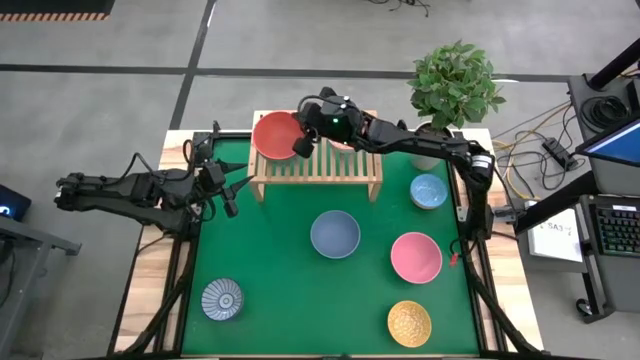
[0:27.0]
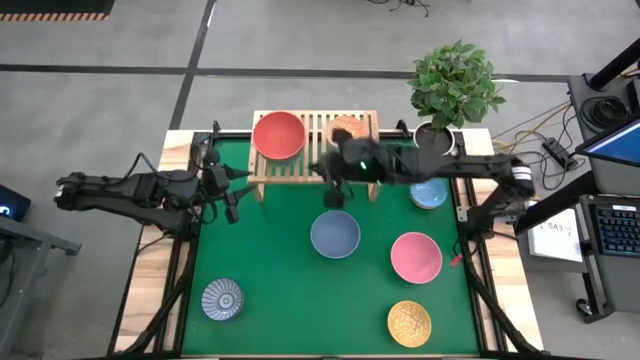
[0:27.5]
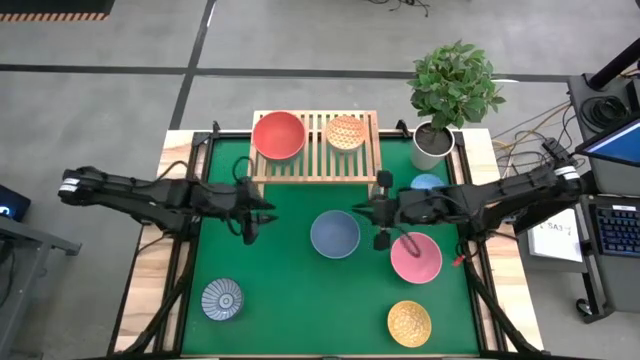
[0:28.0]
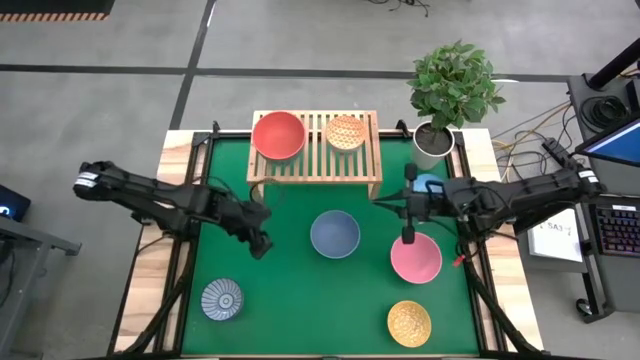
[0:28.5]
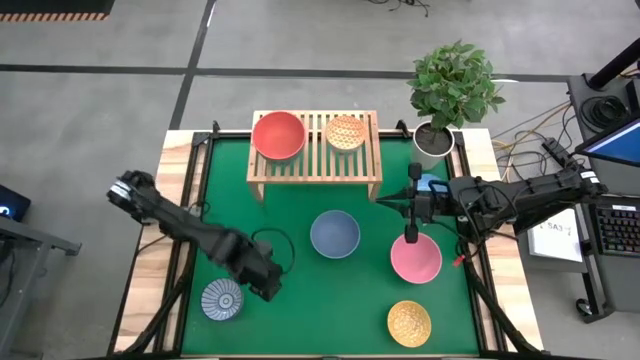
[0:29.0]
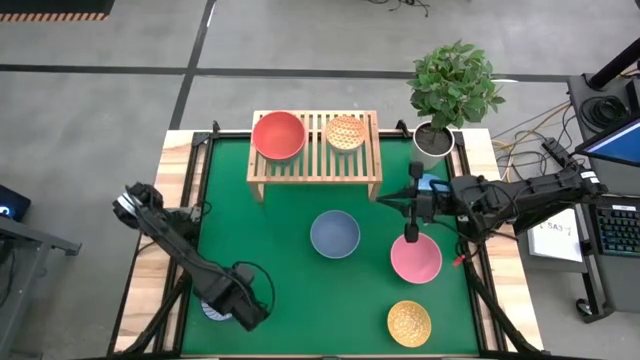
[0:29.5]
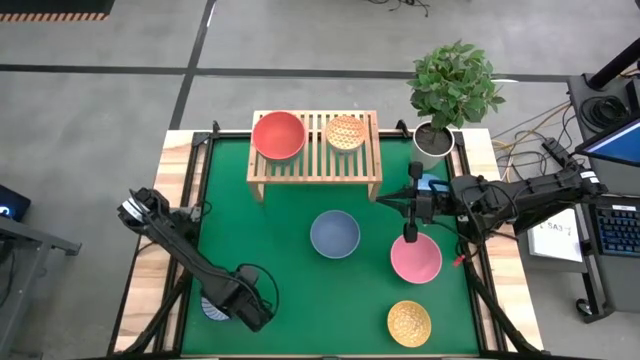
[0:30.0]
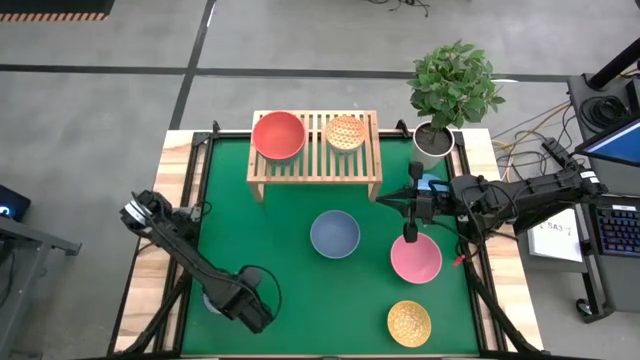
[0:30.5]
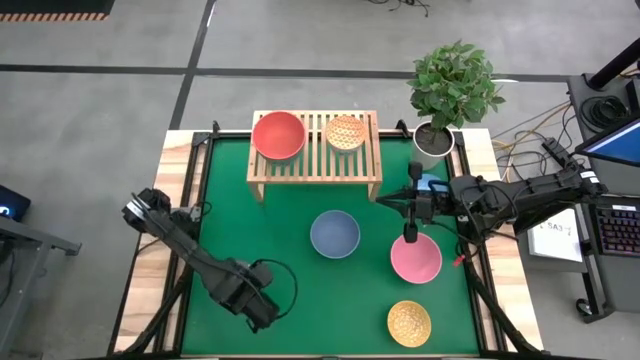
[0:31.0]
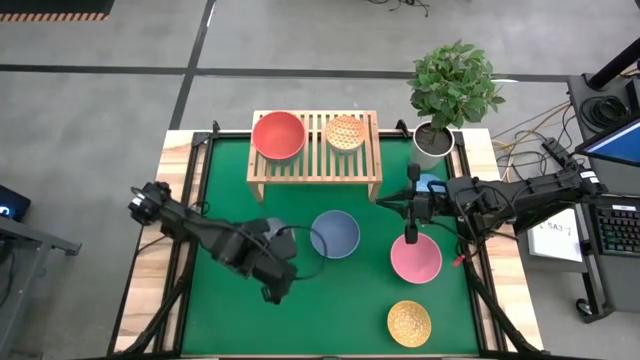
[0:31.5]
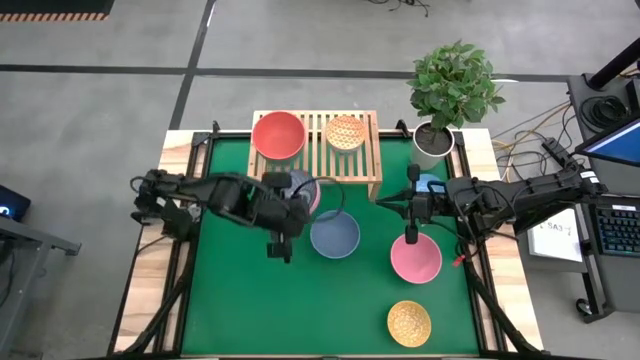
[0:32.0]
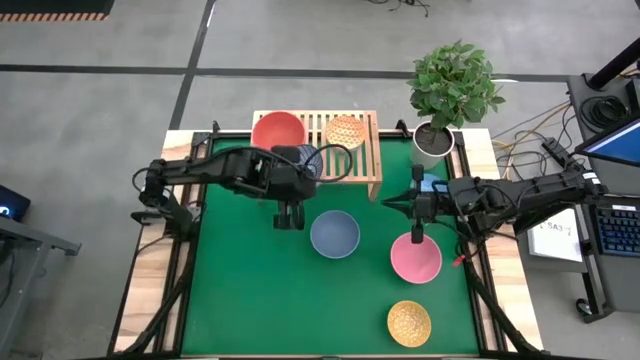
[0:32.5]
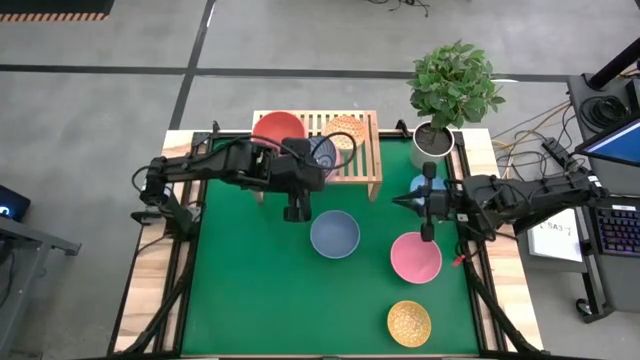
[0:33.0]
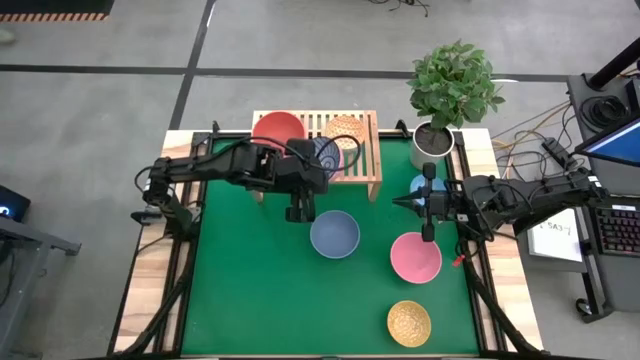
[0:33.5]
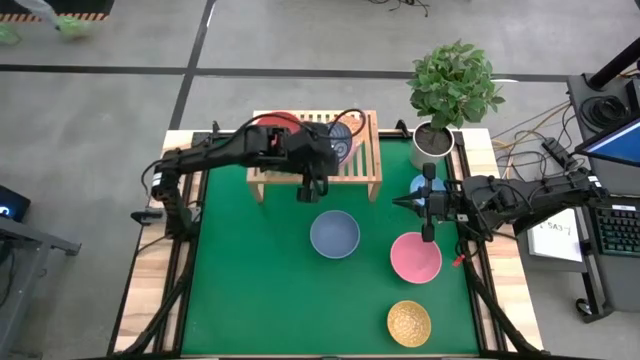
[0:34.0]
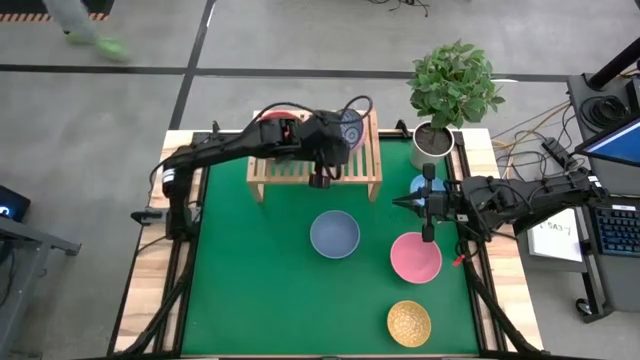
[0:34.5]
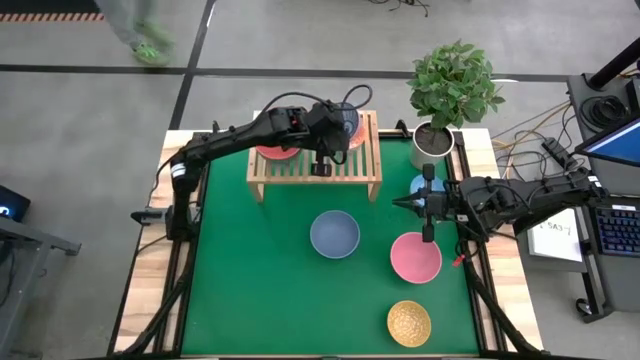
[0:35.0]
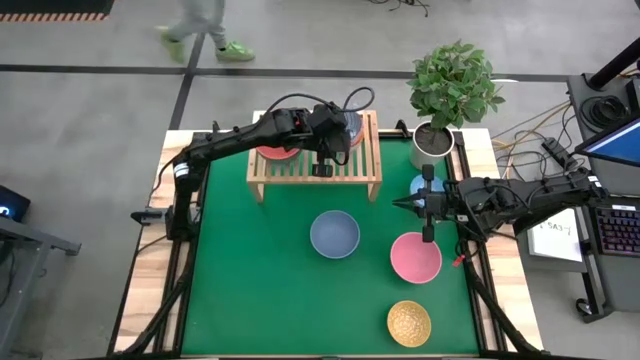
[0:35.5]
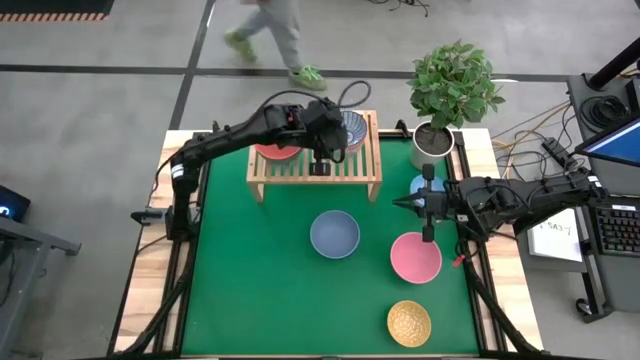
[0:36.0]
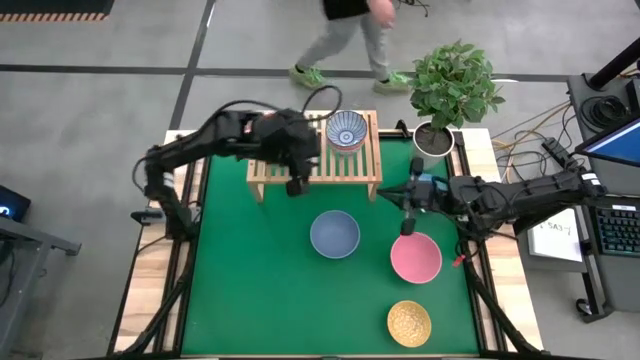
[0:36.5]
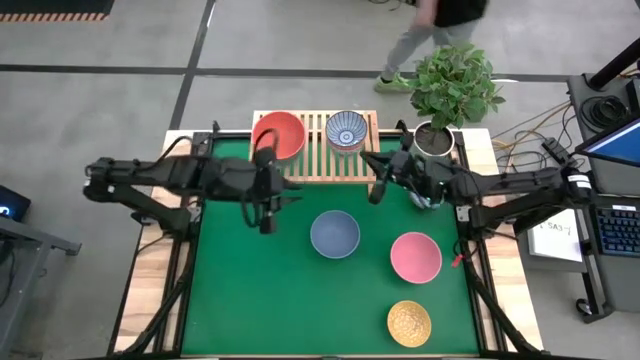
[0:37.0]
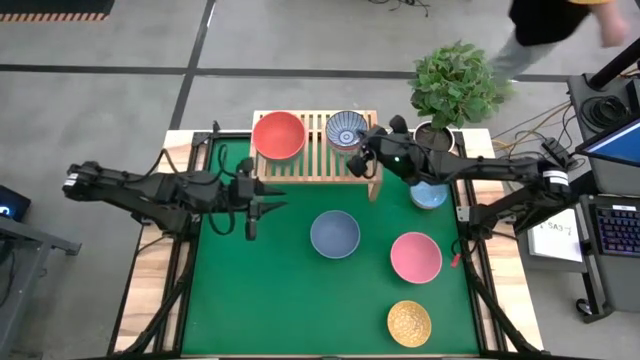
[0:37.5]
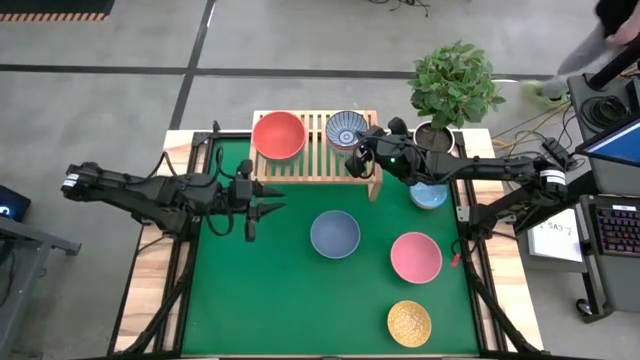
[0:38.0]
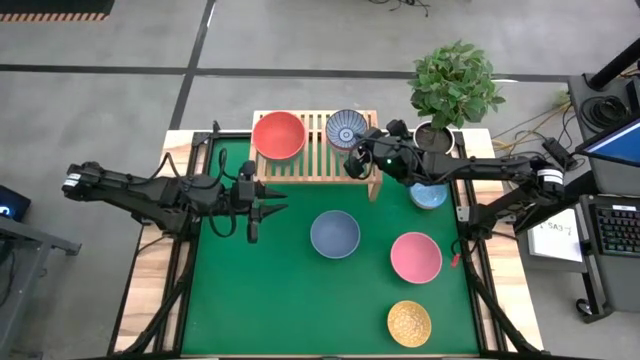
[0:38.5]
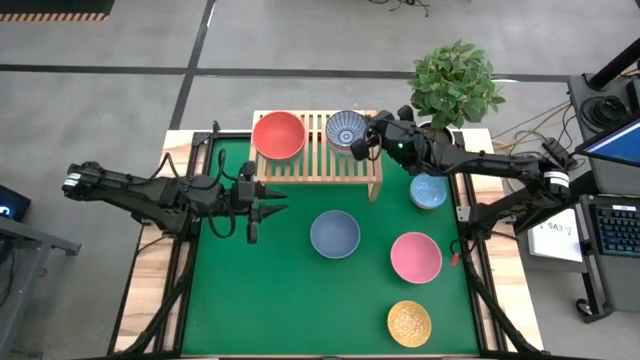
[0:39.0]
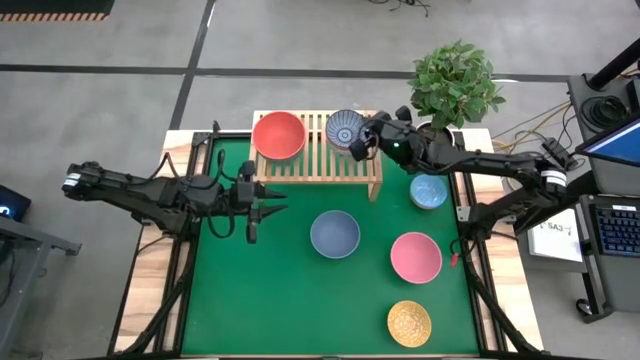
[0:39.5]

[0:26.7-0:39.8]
Task: Place and stack bowls onto a shelf
Stack the small blue patterned bowl on the small orange bowl on the shelf

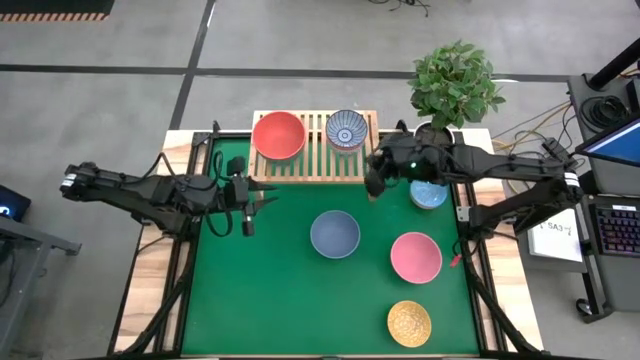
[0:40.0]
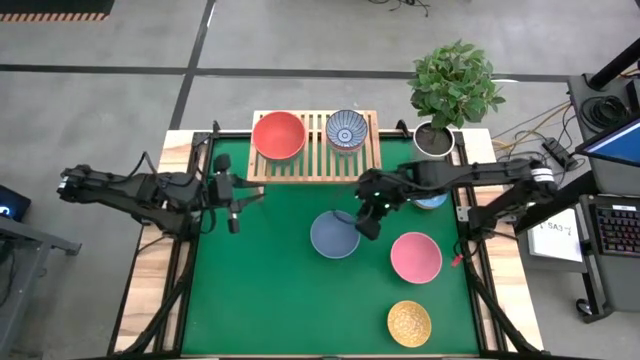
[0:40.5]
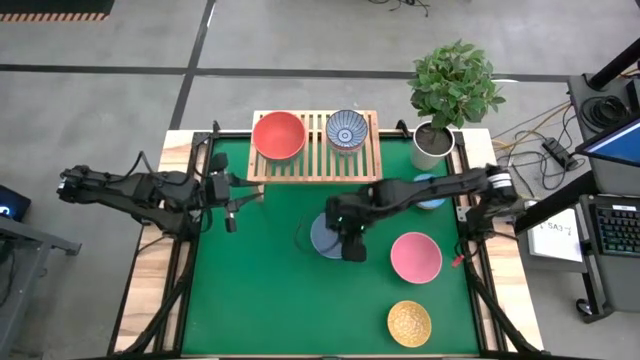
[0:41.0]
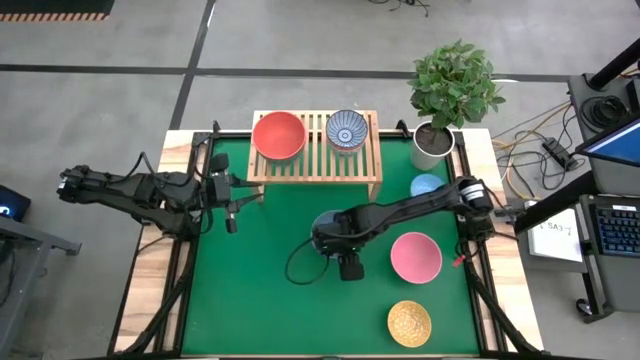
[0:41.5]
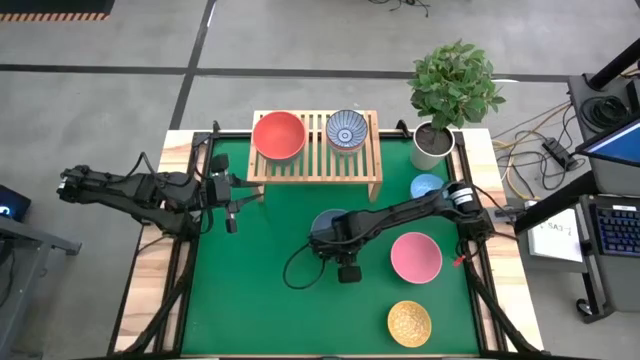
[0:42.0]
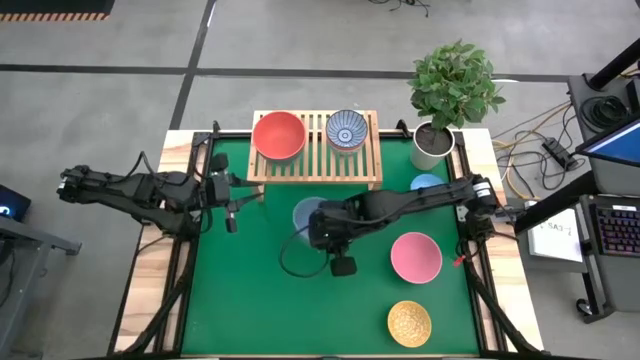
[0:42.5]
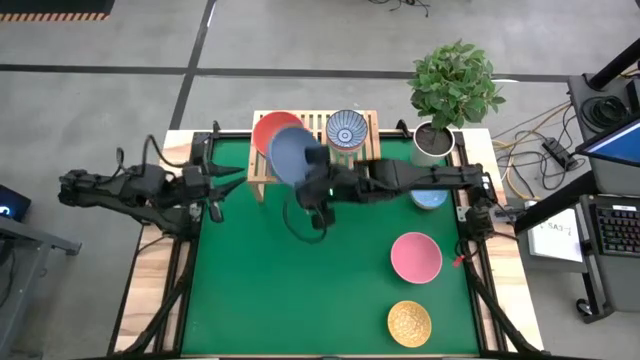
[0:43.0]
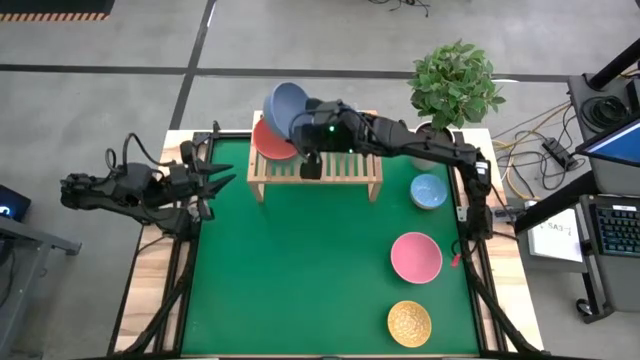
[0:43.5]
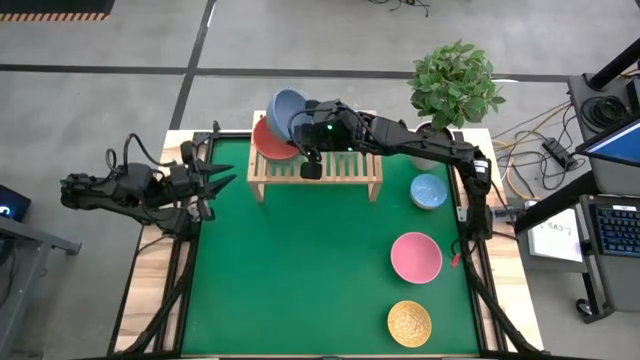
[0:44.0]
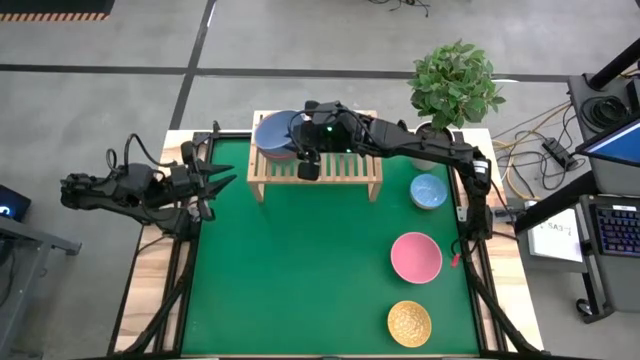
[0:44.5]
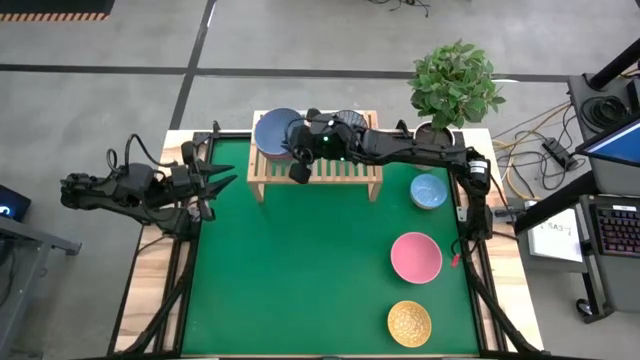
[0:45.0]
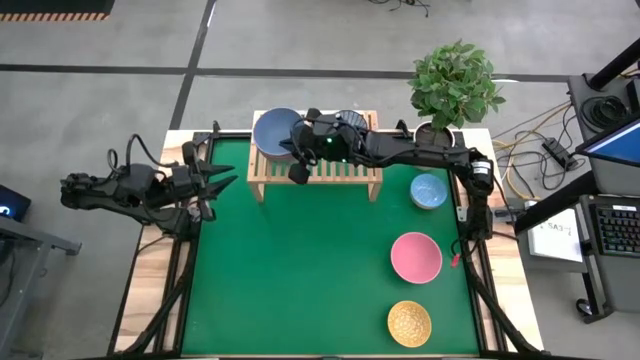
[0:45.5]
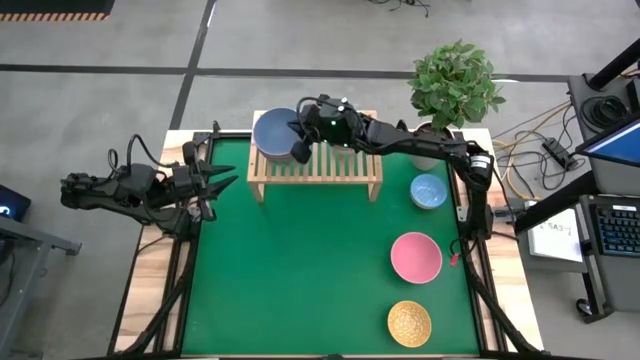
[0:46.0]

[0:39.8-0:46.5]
Stack the large gray bowl on the large orange bowl on the shelf

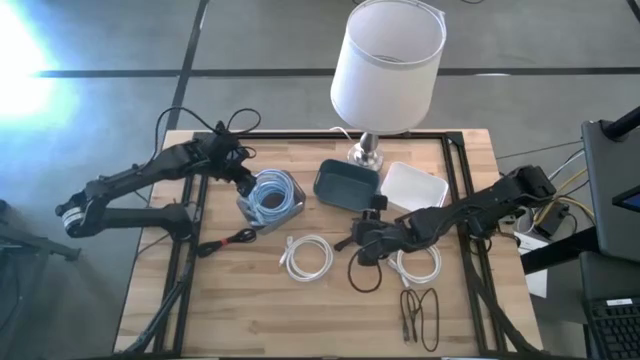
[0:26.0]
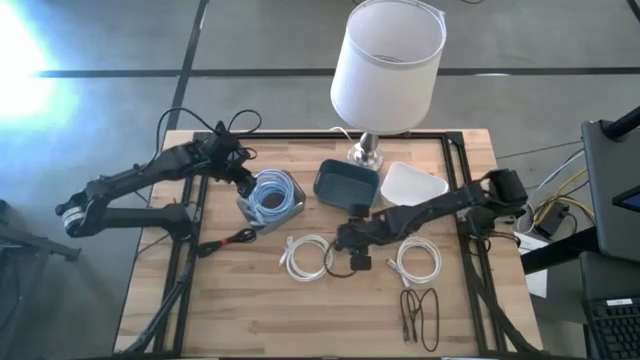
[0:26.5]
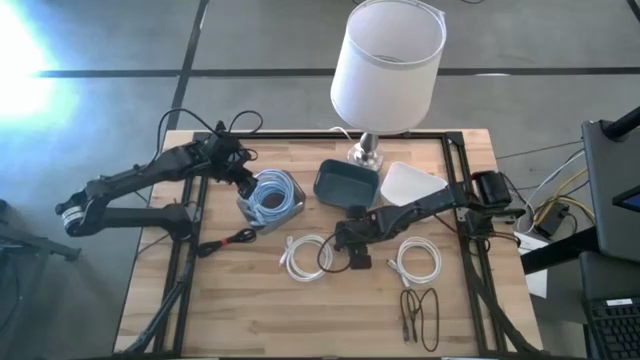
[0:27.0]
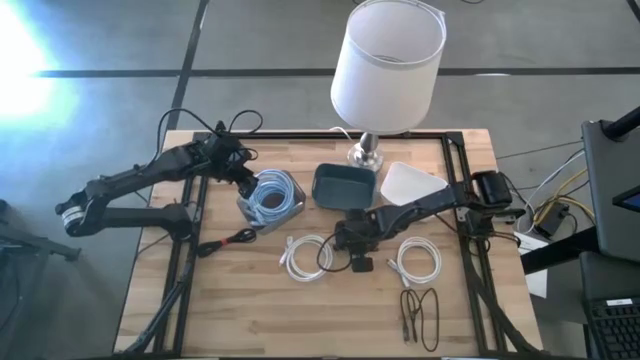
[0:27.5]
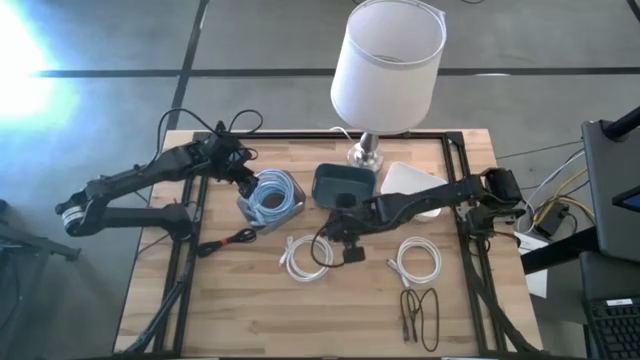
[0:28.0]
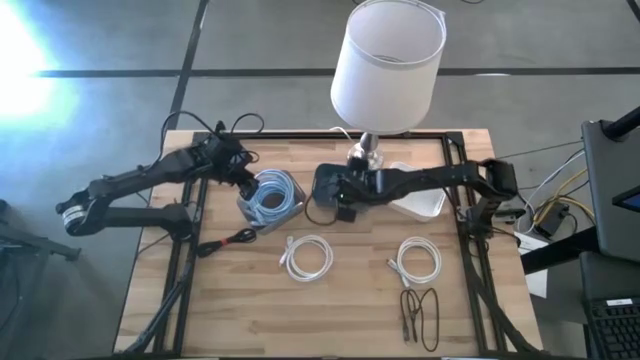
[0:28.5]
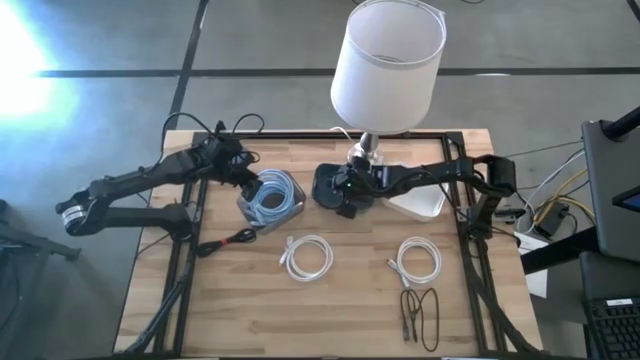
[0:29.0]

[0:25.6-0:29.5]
Task: Pick & Place USB Port
Put the top right black USB cable into the blue bin
